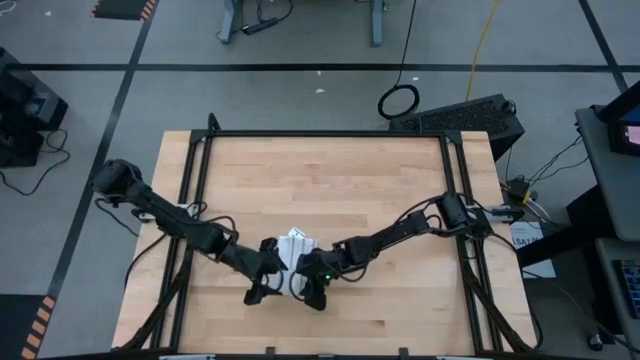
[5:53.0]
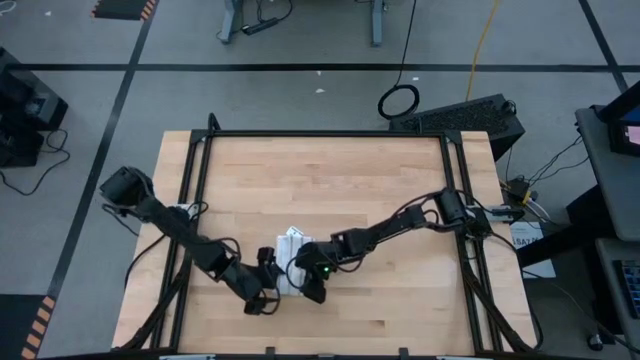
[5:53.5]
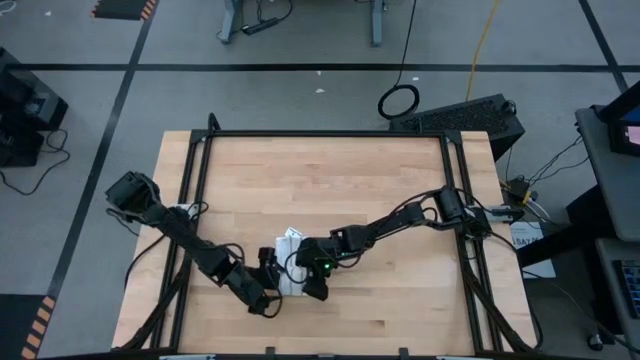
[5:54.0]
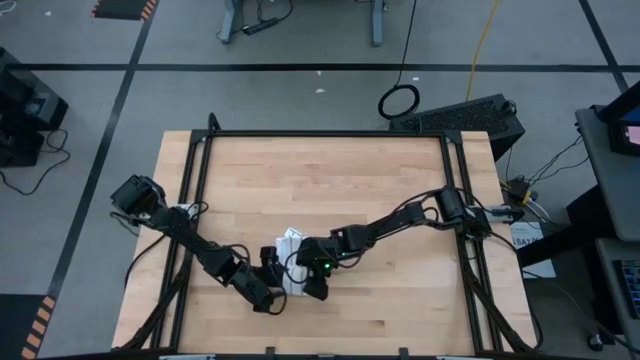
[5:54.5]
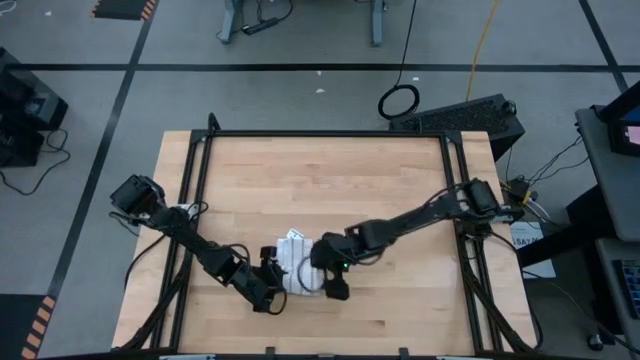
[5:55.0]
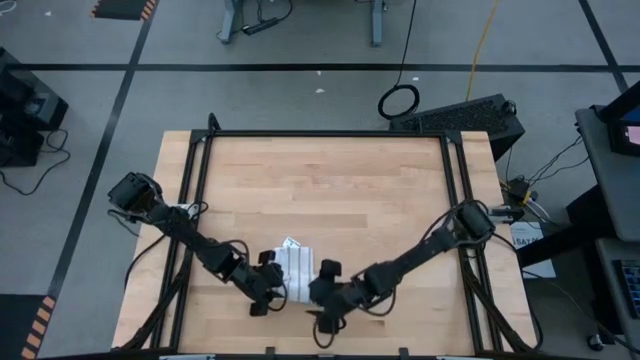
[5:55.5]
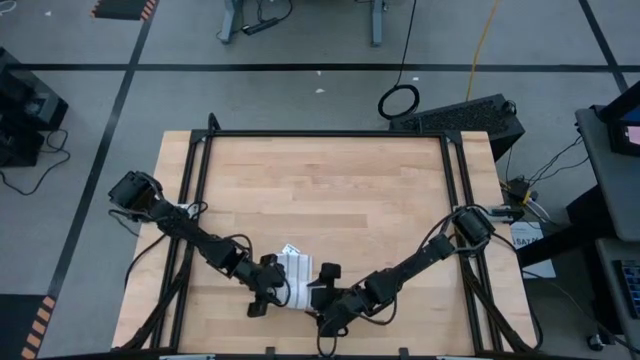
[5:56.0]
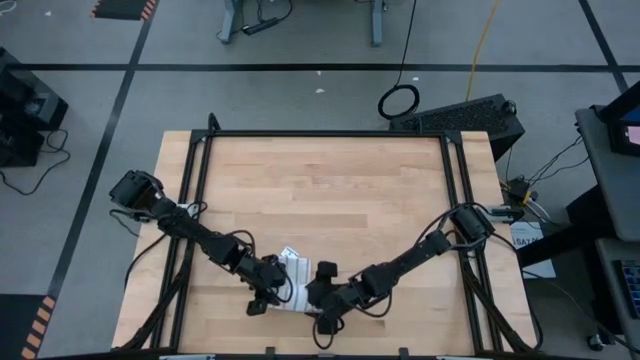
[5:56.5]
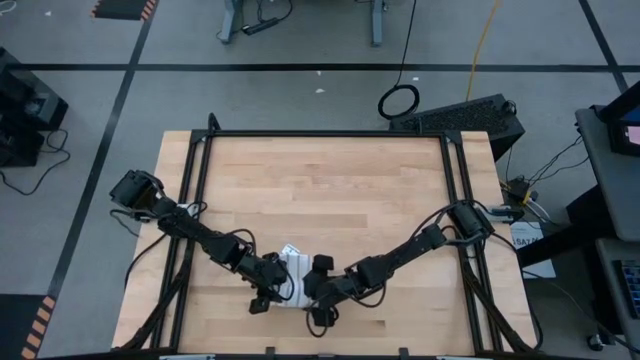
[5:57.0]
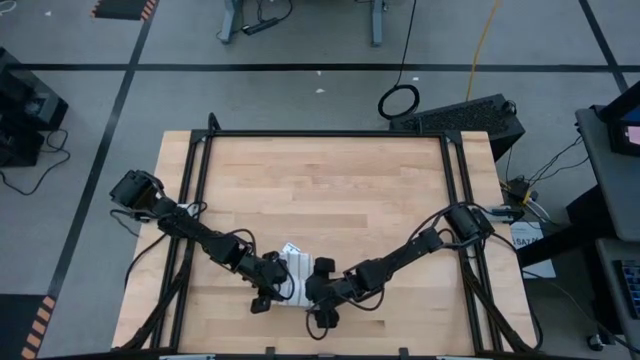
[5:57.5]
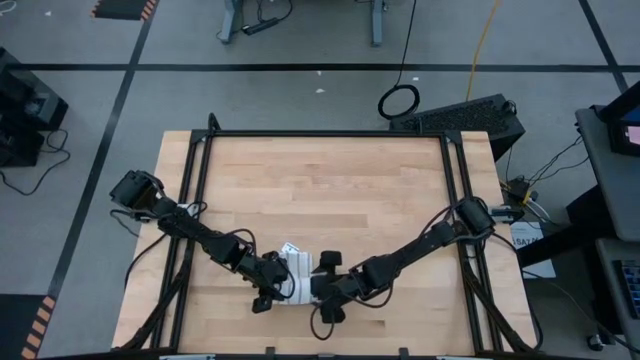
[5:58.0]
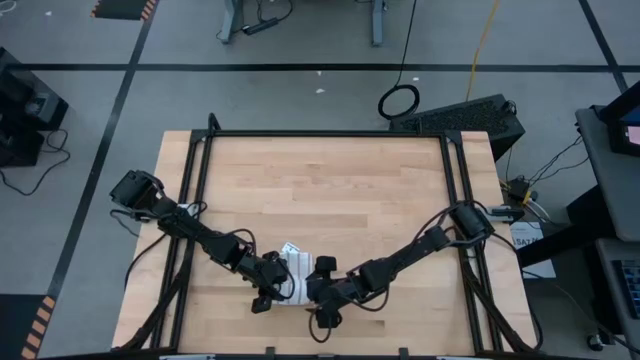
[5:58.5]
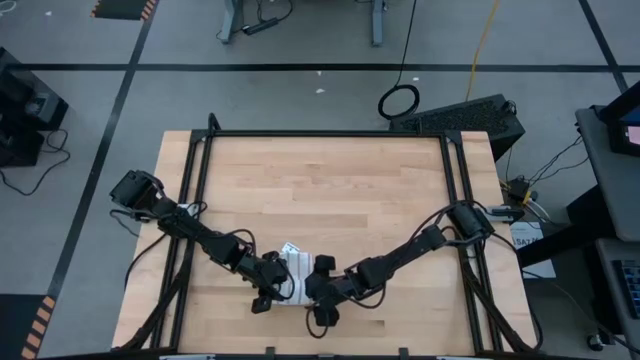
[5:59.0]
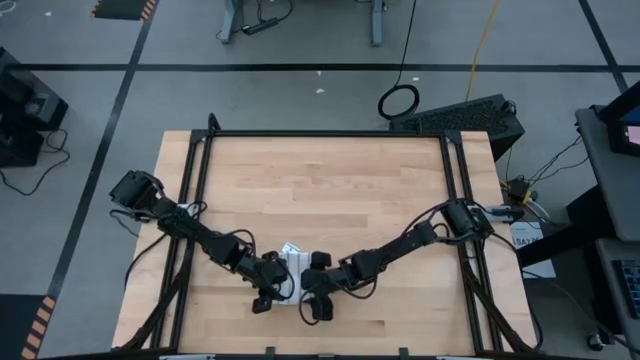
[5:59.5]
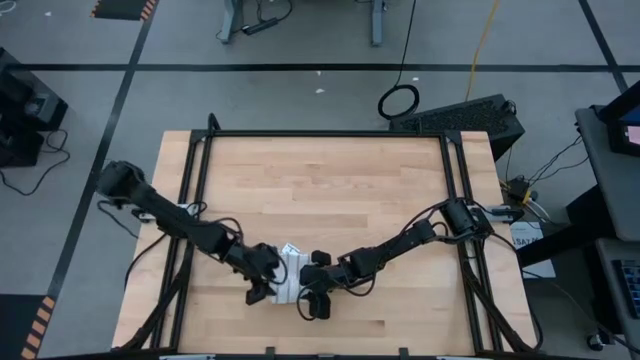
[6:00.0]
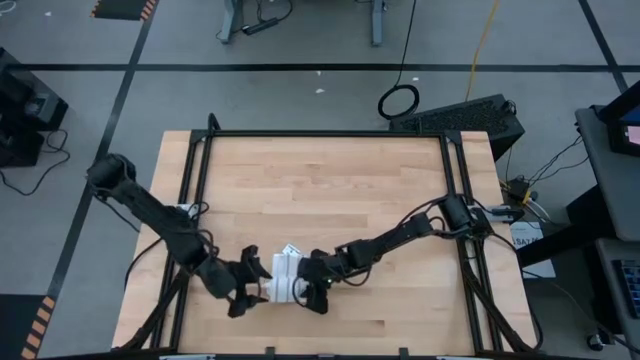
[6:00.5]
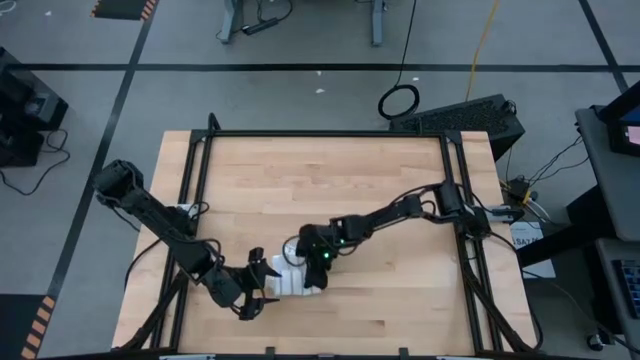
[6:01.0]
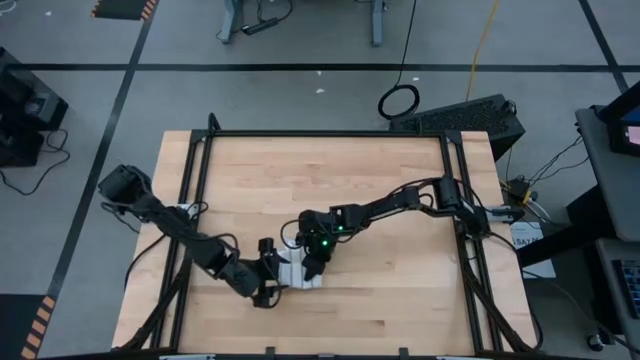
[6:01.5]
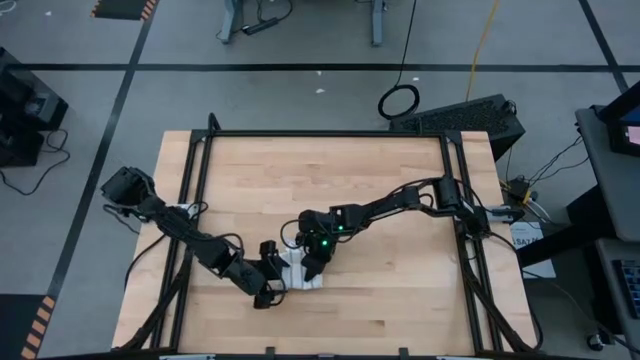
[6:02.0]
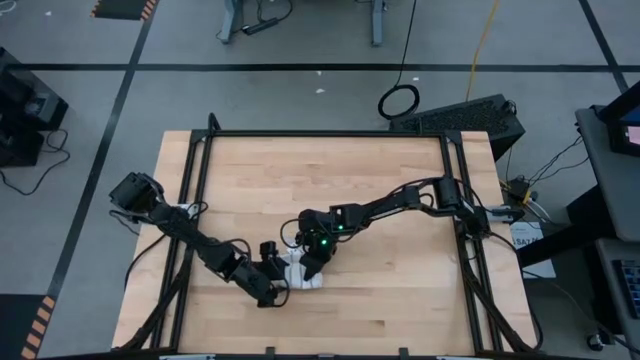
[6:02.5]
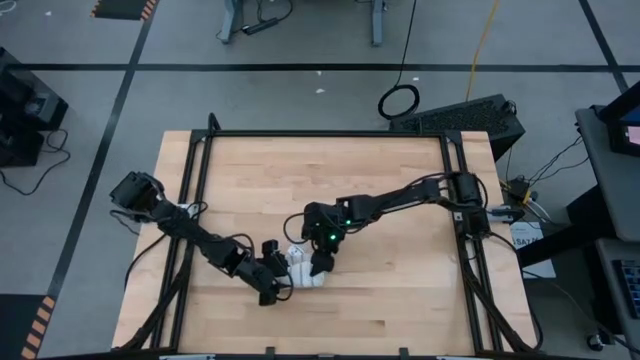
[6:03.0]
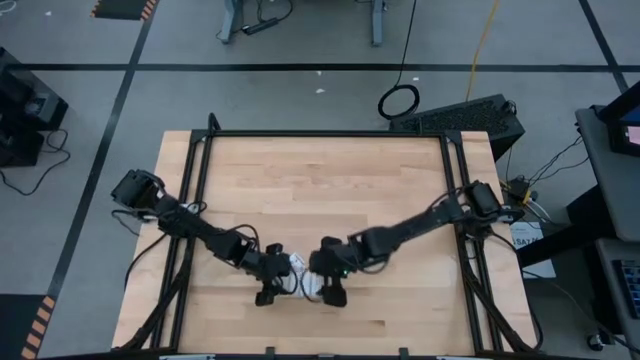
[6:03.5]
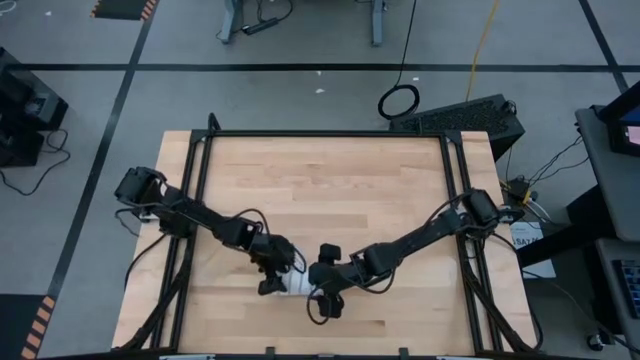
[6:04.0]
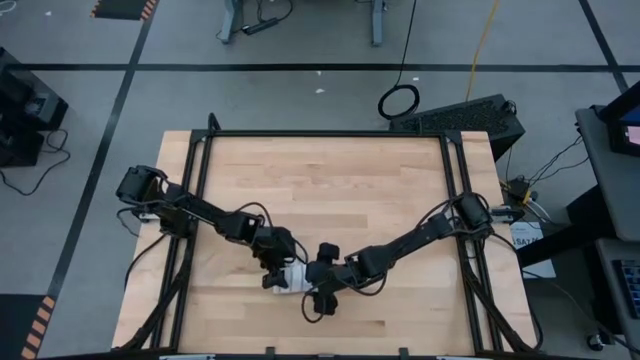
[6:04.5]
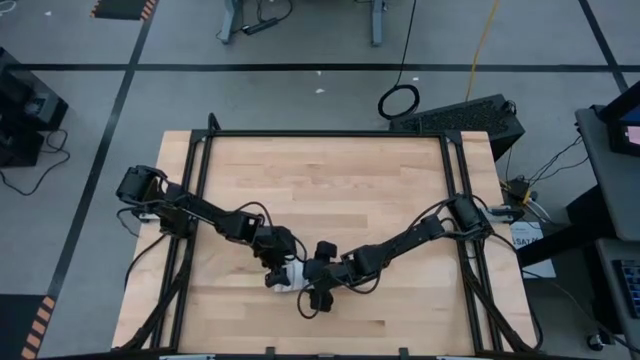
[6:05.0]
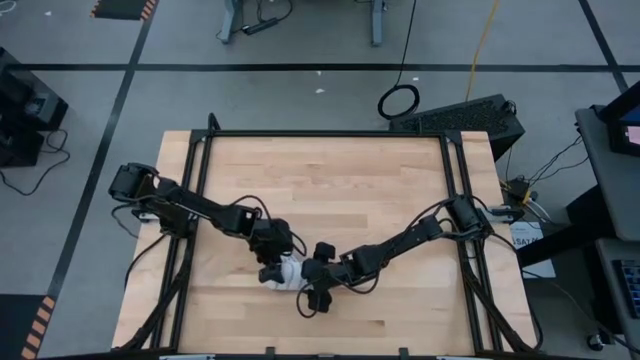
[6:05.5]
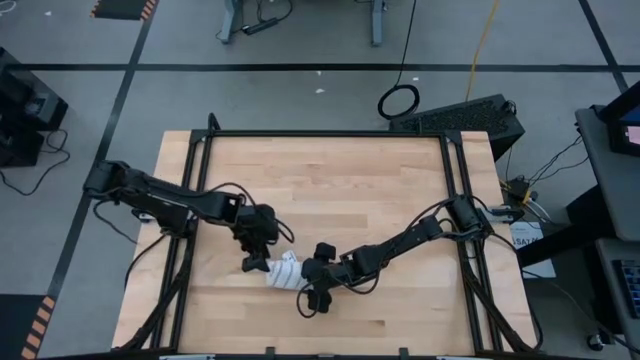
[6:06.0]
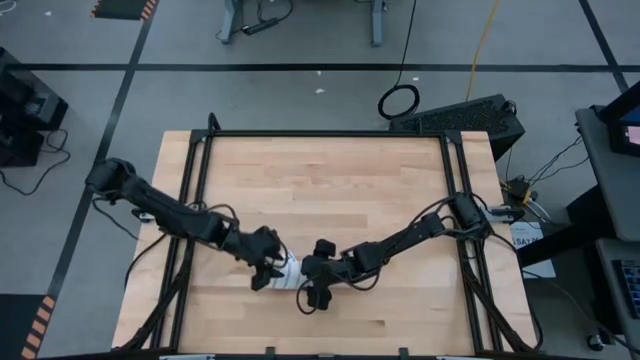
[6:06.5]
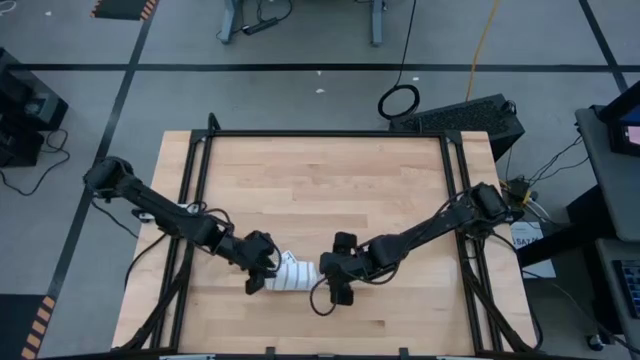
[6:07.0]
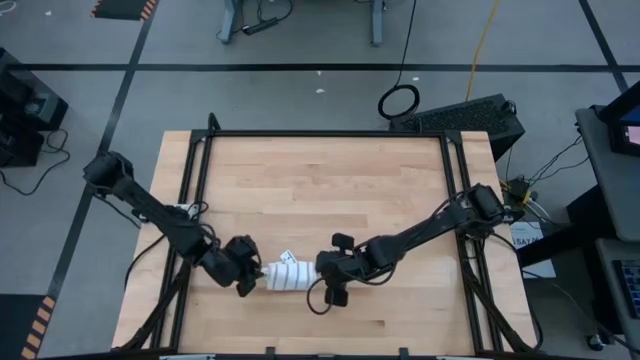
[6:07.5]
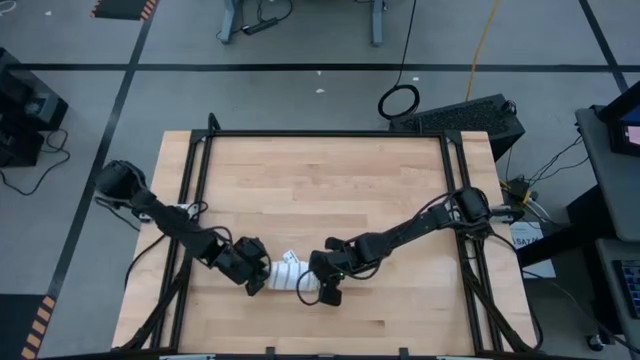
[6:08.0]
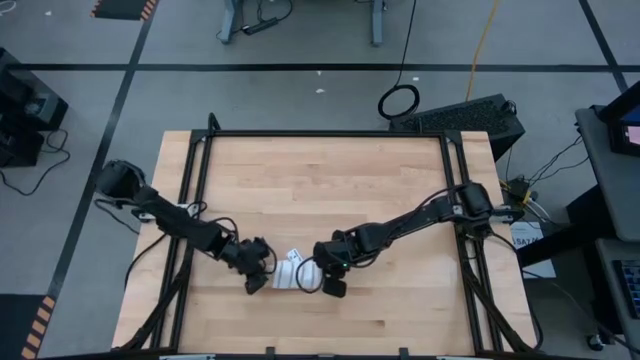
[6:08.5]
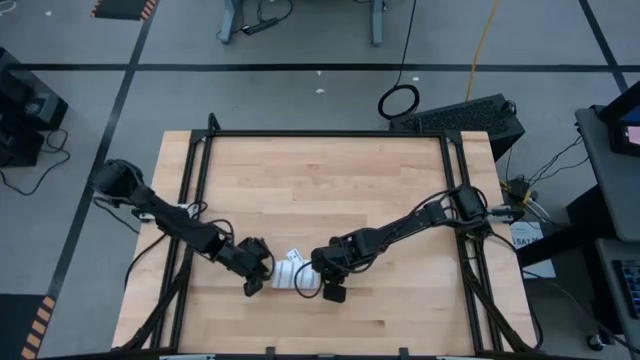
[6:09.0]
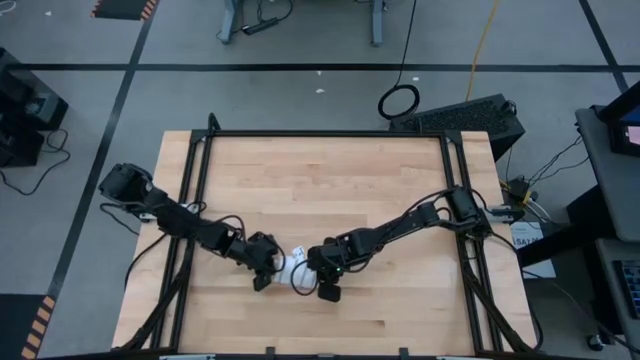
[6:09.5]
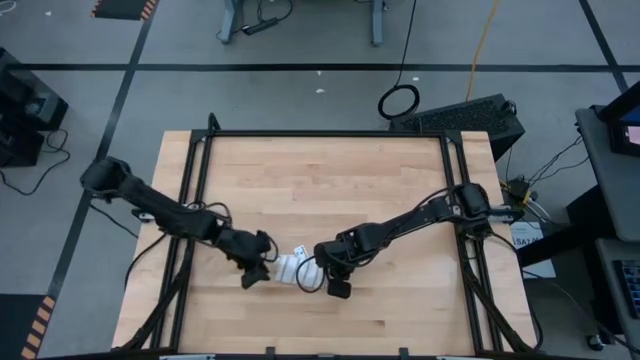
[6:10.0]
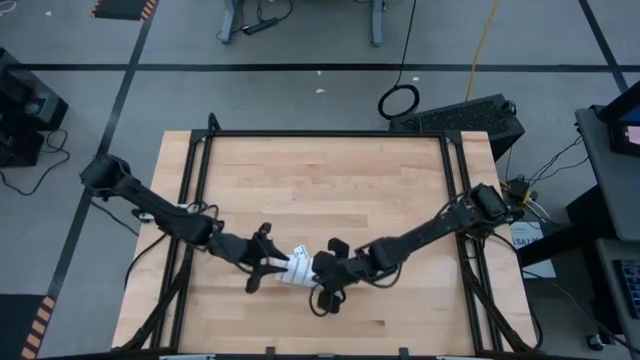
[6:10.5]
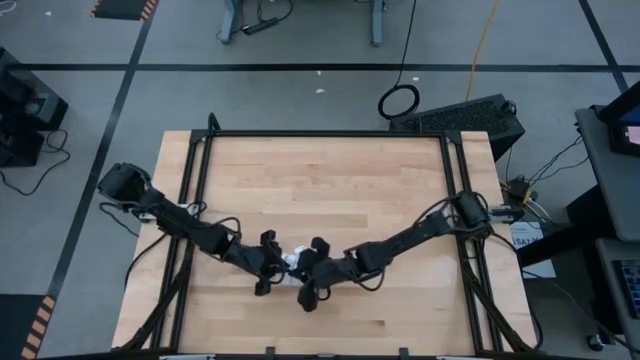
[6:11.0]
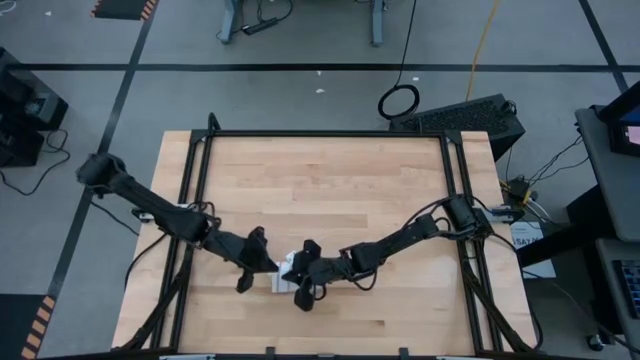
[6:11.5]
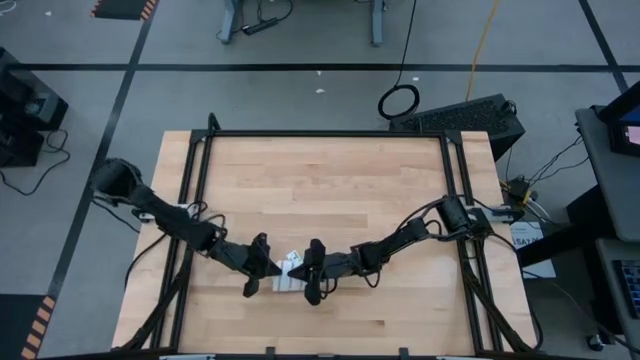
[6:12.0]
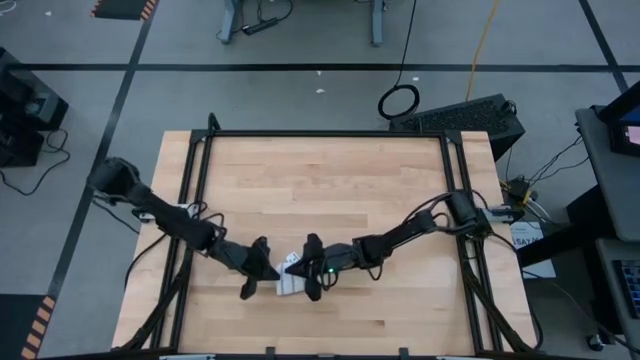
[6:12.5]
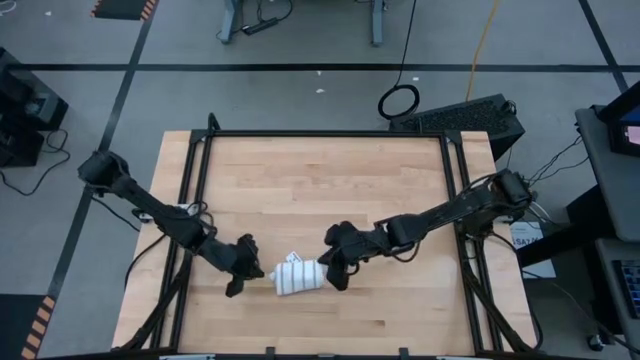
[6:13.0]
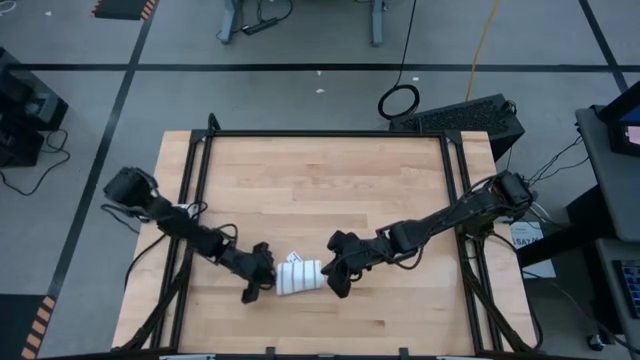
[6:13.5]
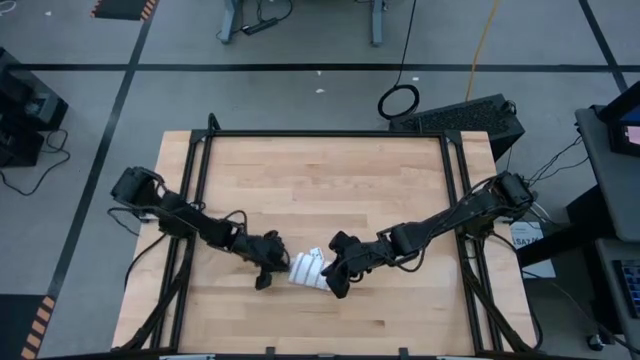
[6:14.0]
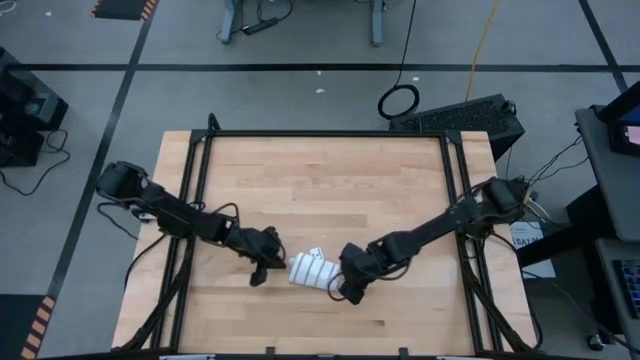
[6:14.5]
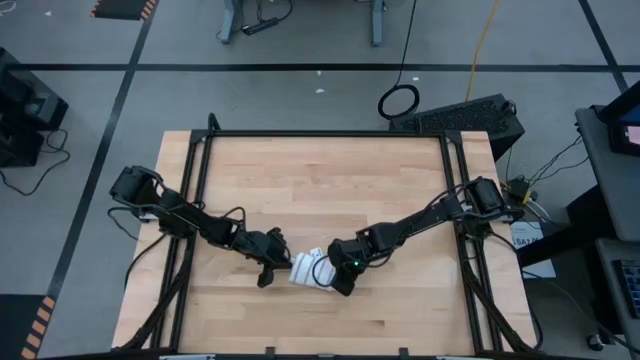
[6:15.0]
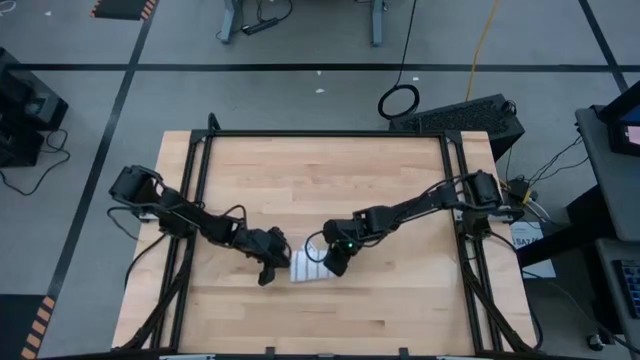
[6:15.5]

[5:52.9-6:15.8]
Task: Roll towel into tight, uniform cylinder
Roll the white brown kitchen towel
